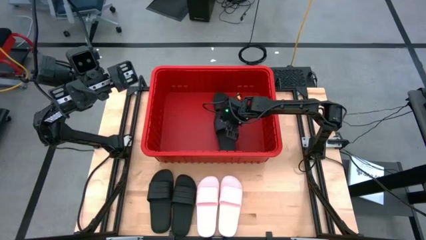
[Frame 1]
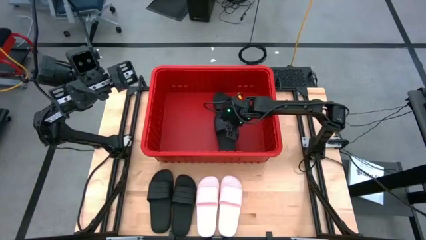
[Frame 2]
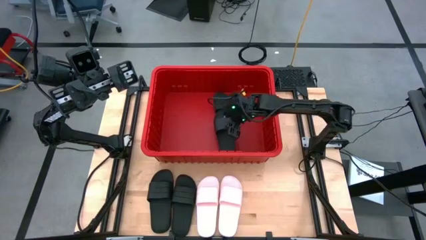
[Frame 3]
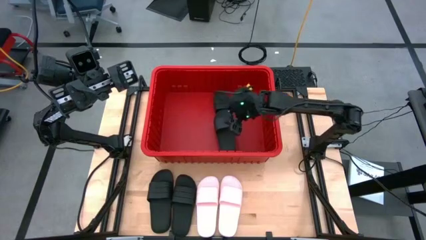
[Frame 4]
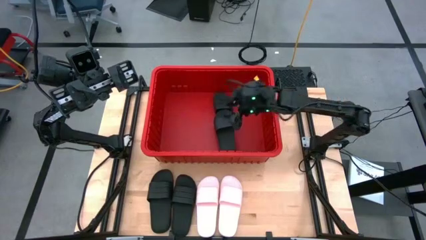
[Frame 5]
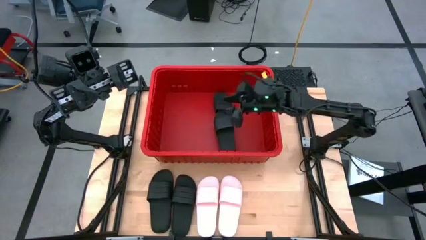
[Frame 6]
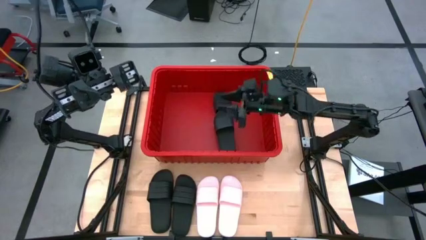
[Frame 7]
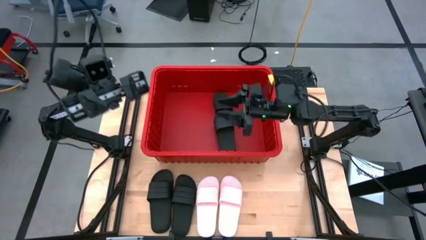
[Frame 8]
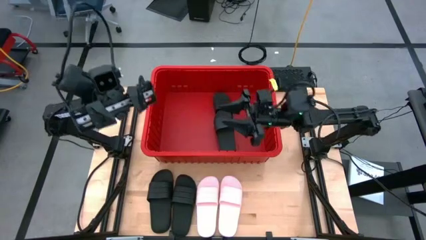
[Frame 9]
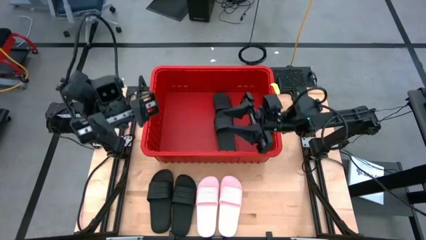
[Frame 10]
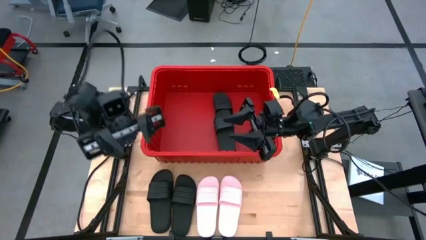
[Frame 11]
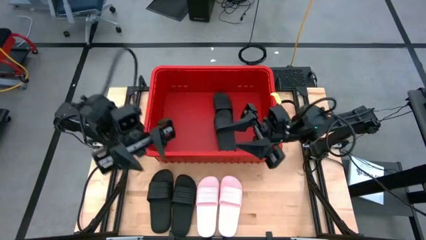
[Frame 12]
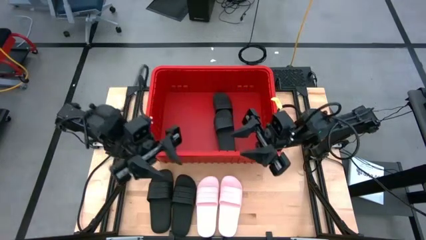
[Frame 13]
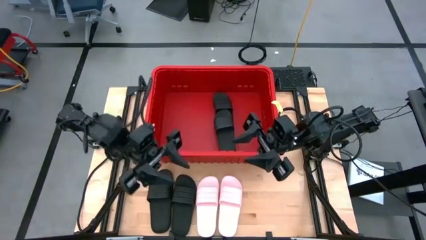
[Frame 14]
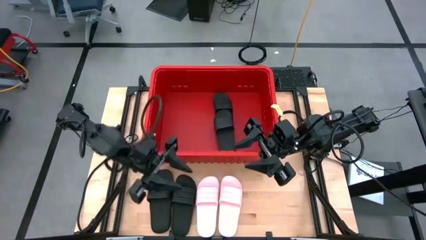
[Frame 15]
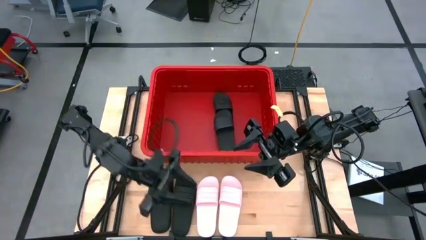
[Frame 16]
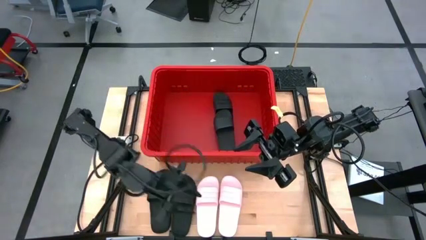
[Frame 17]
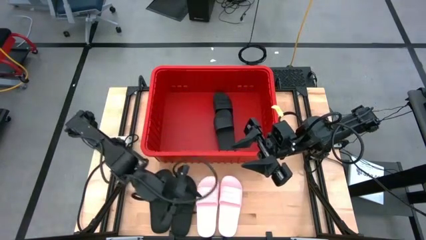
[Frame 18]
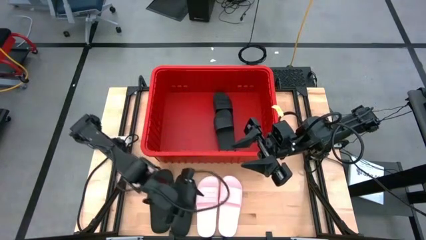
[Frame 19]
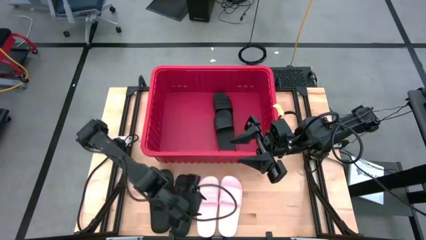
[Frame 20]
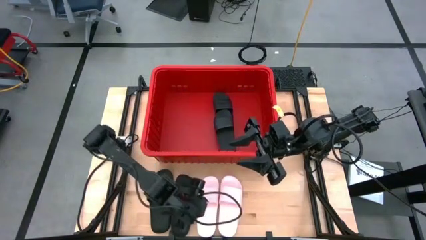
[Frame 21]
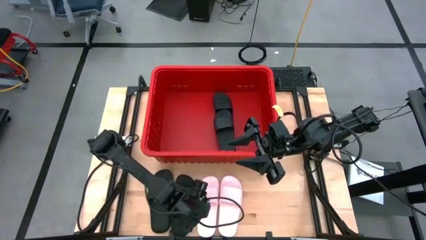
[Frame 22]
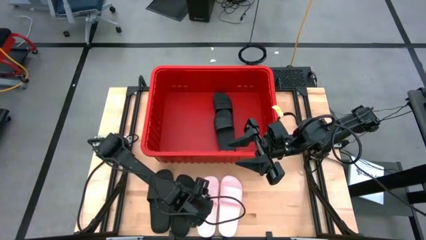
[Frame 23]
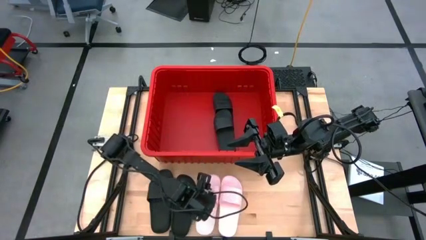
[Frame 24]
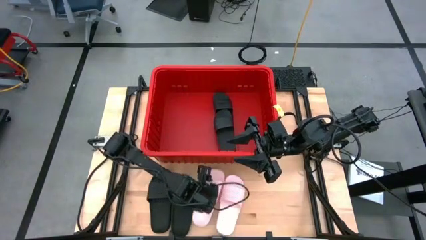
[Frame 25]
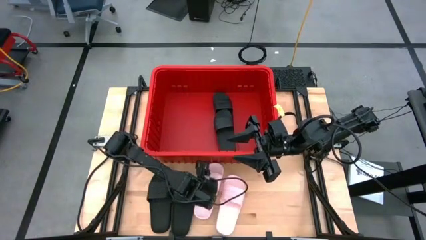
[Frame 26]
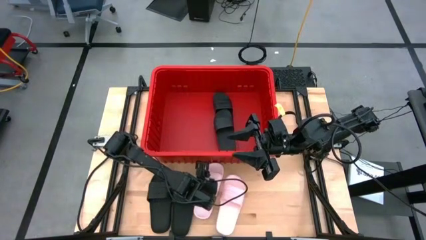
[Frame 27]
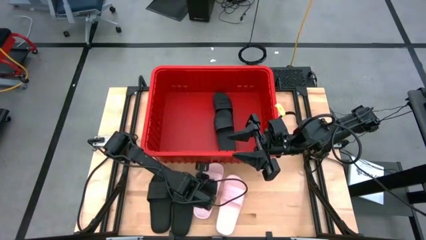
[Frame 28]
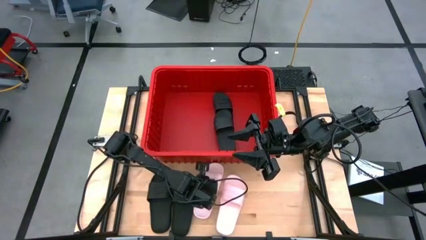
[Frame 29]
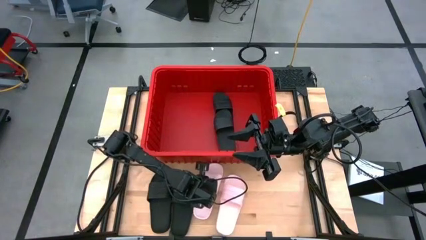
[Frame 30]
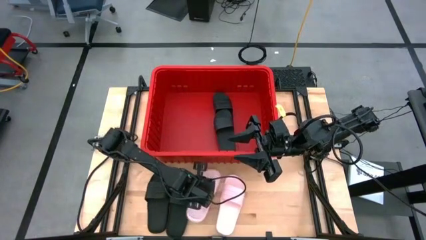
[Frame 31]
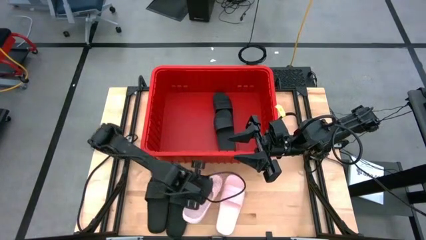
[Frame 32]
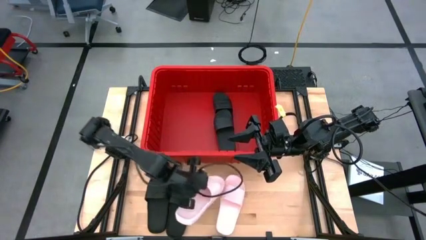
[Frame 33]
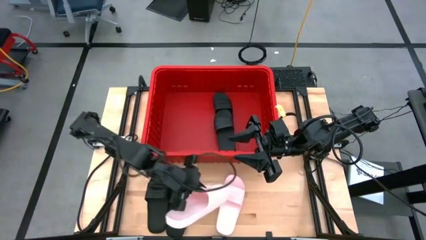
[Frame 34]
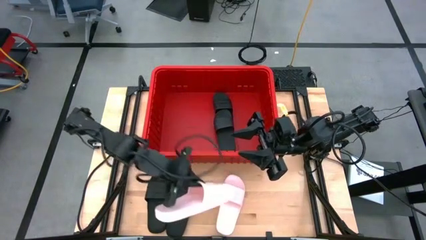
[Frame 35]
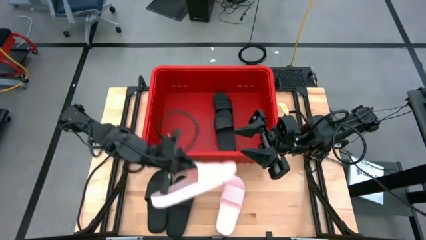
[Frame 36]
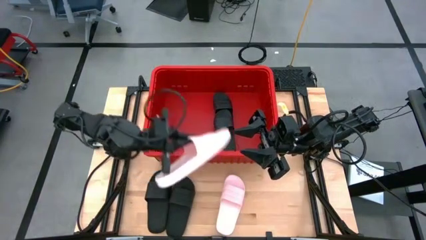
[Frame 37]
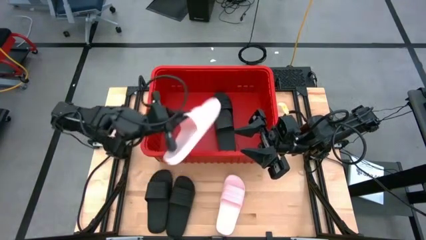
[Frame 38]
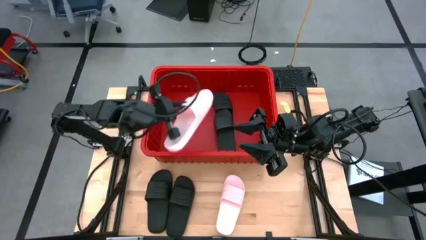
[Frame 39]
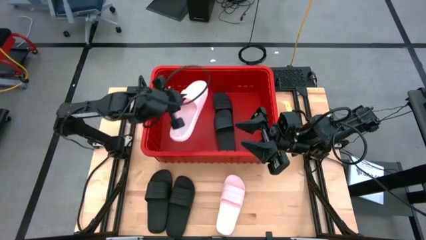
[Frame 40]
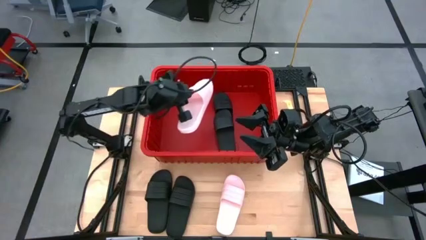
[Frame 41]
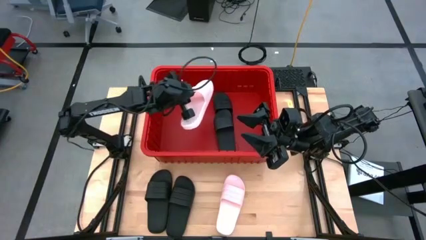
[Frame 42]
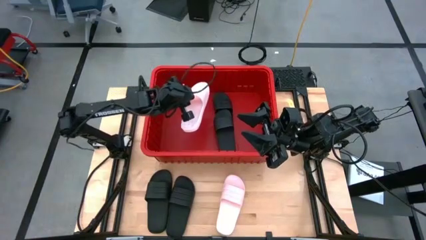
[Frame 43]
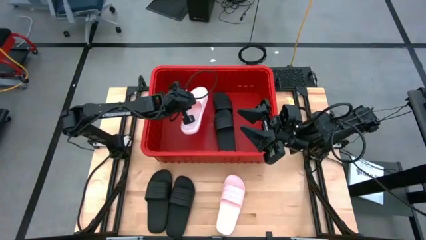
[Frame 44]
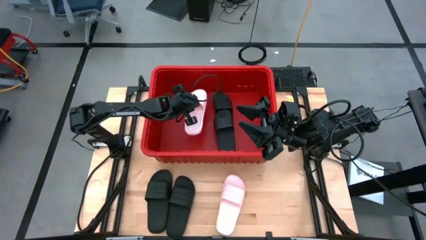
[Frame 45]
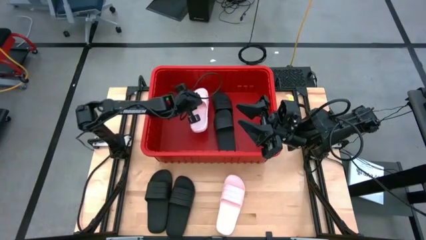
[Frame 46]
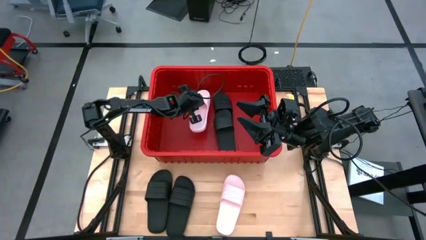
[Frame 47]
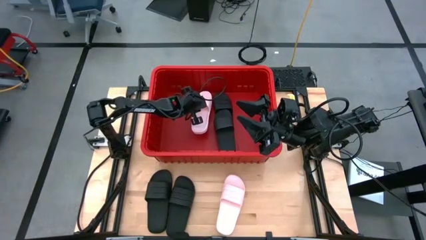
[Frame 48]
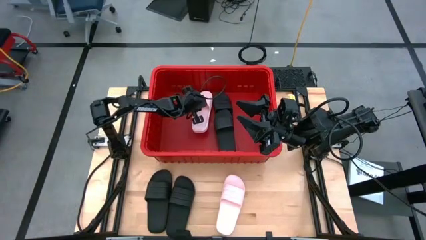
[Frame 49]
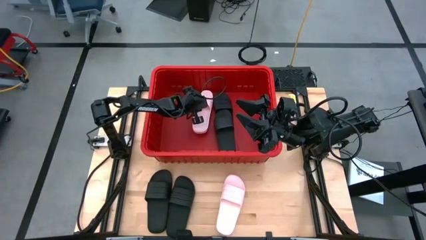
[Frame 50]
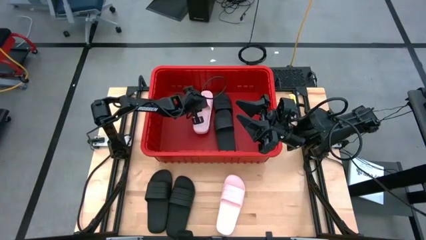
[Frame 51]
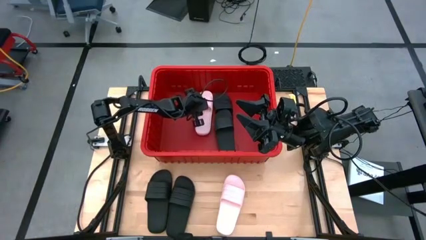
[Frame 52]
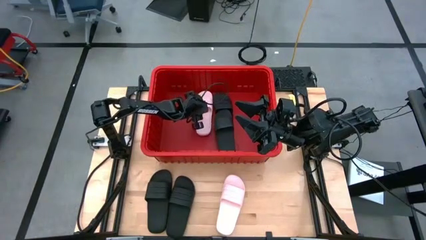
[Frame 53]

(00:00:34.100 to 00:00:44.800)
Task: Pick and place slides into bin
Put the left pink slide into the red bin

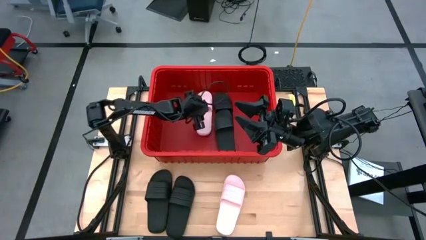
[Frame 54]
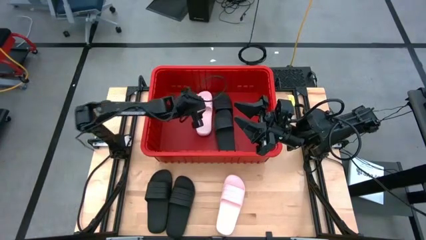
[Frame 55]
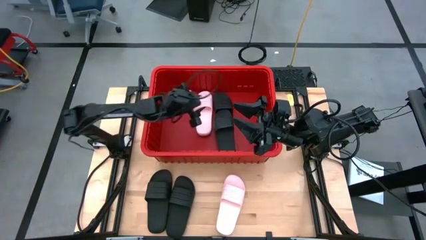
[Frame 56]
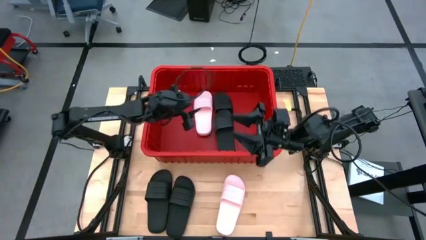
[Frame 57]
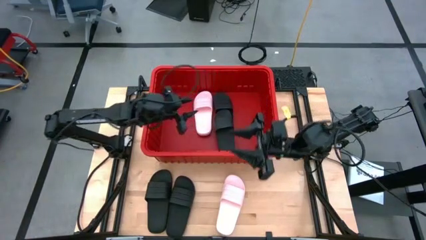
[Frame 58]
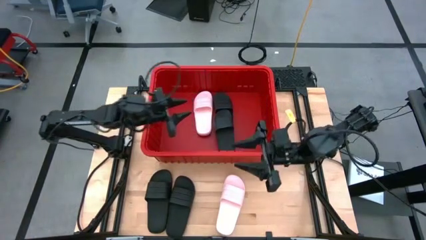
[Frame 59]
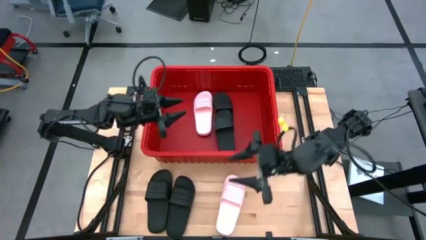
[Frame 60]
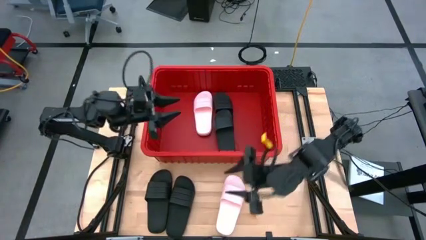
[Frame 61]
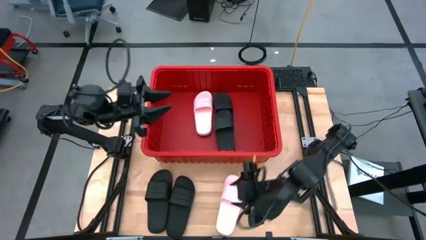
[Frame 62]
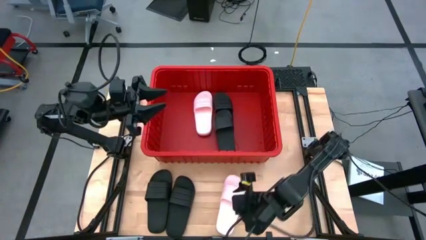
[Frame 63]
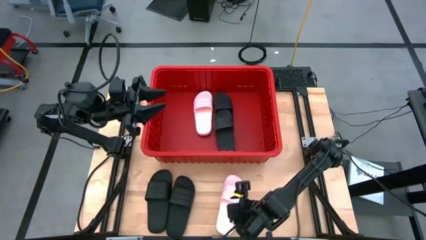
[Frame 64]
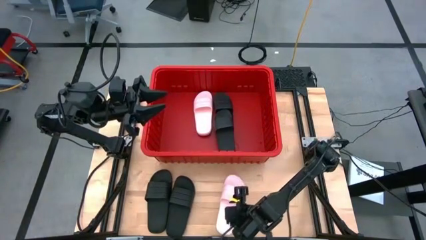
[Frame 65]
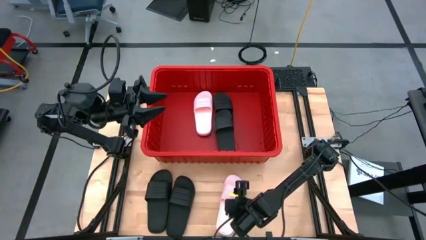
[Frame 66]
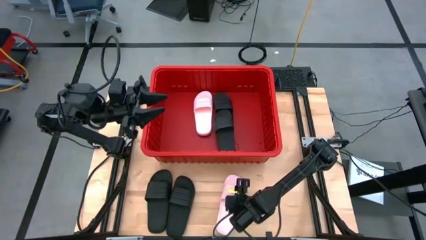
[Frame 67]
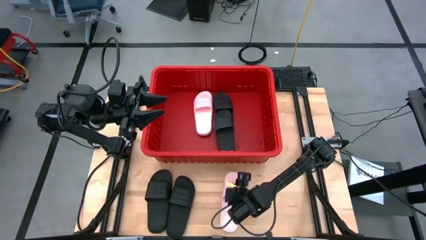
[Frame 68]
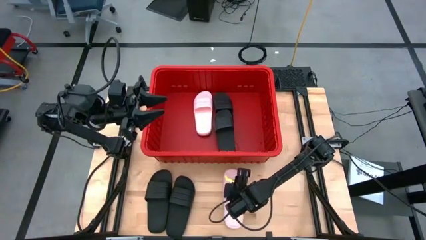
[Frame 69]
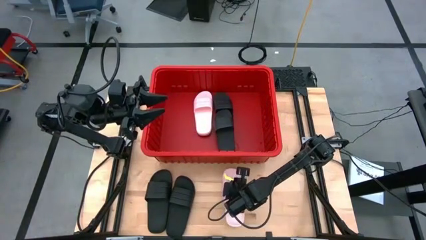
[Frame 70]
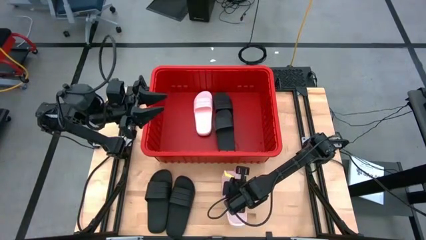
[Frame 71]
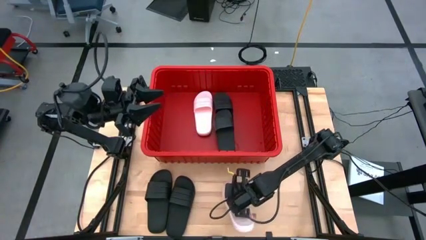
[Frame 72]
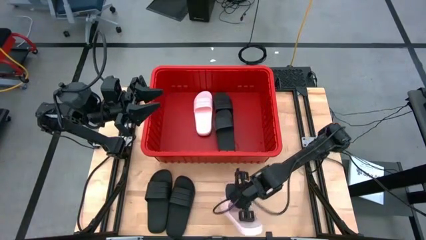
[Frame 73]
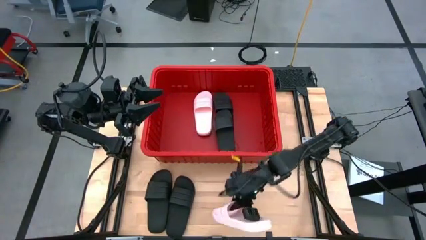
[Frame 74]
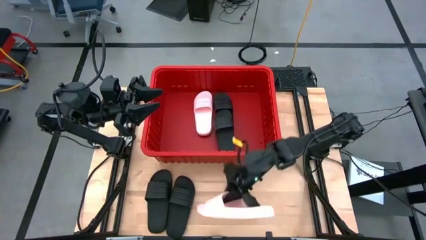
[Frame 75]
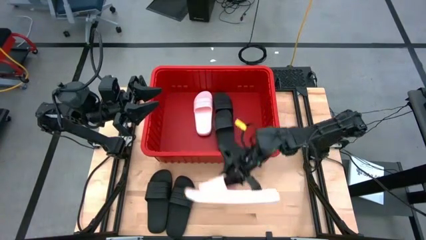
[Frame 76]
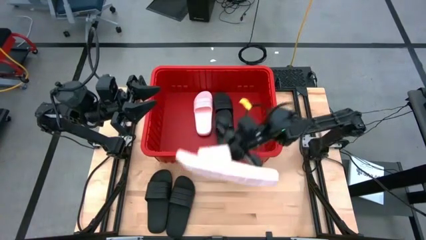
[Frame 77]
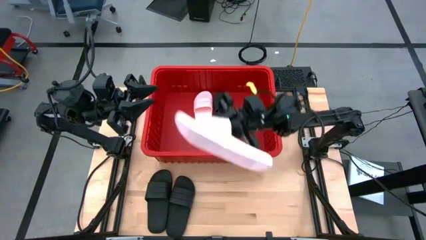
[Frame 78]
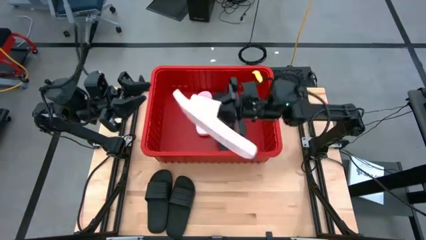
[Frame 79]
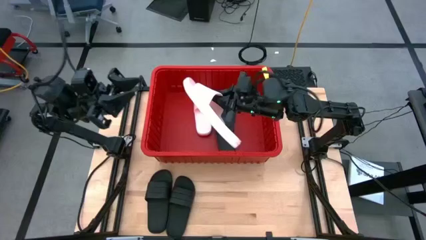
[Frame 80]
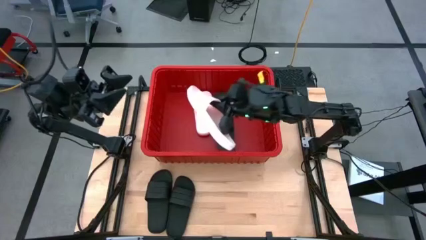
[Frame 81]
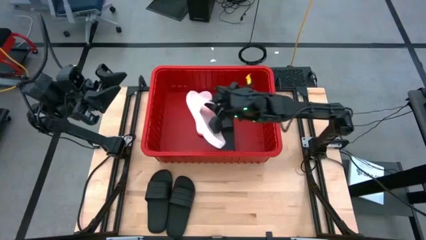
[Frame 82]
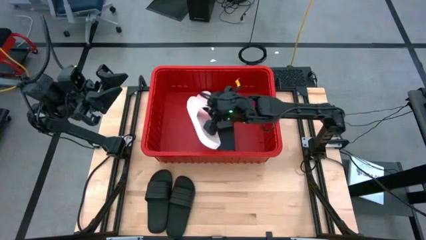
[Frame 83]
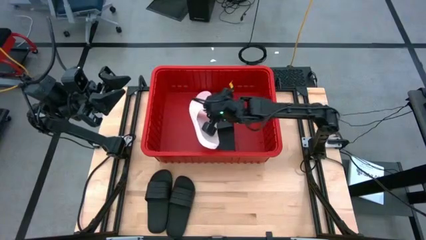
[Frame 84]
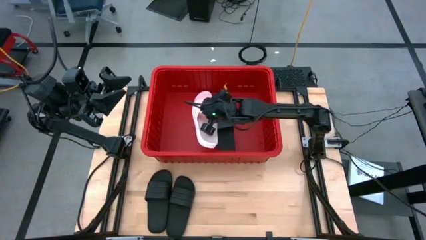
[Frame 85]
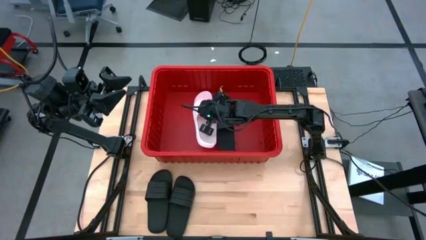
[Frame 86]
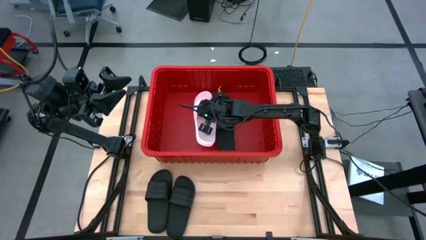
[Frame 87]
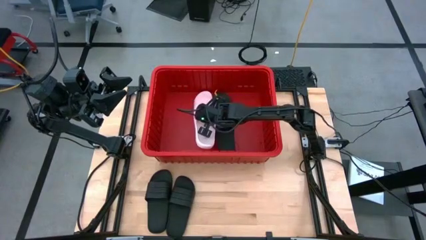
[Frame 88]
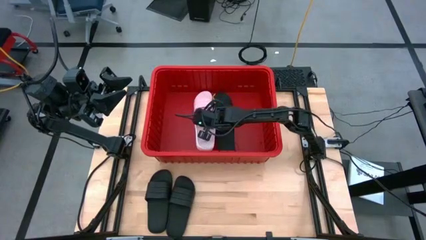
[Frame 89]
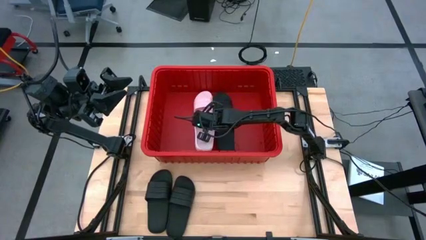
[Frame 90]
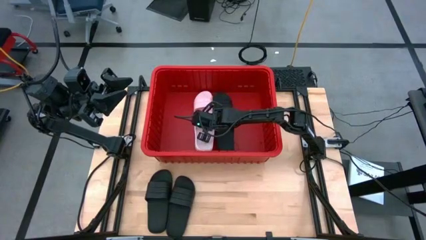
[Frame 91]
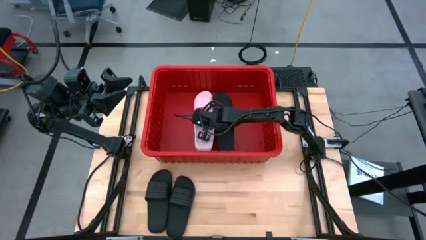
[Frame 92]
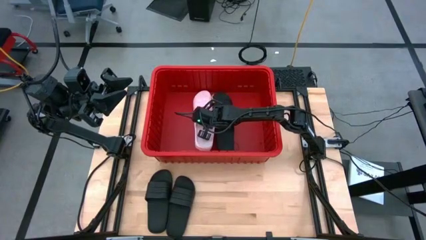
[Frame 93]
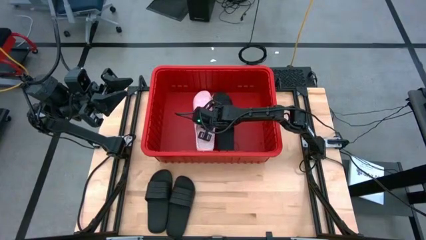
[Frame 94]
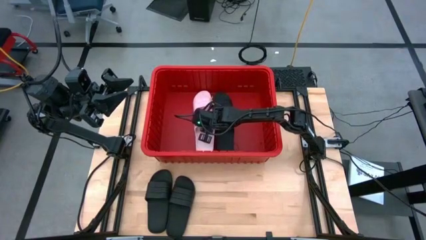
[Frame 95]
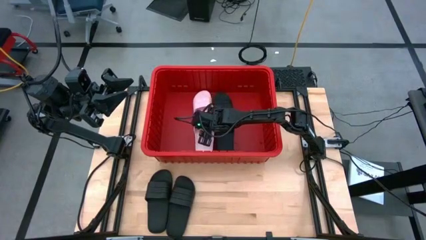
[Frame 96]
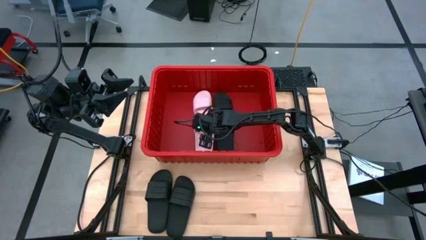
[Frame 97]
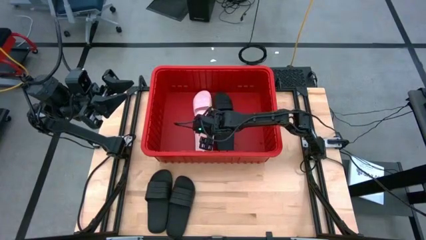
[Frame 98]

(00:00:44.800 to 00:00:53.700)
Put the pink slide into the red bin
